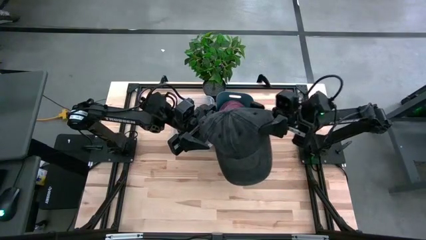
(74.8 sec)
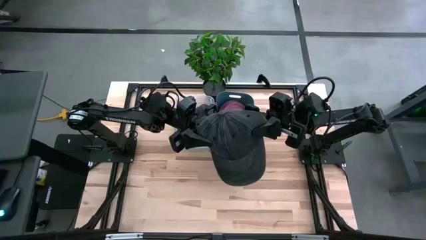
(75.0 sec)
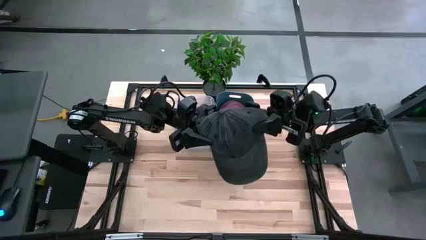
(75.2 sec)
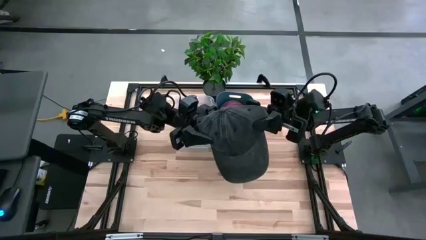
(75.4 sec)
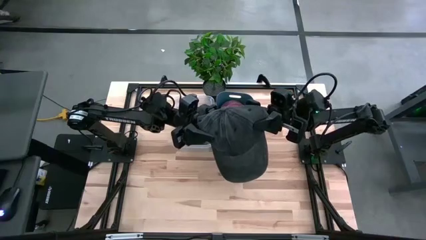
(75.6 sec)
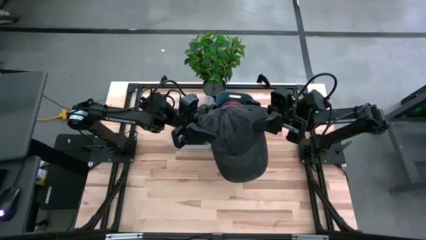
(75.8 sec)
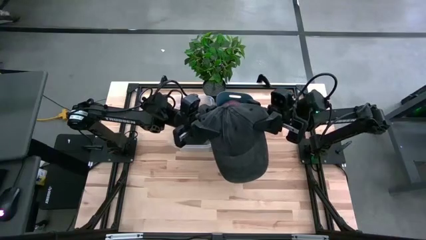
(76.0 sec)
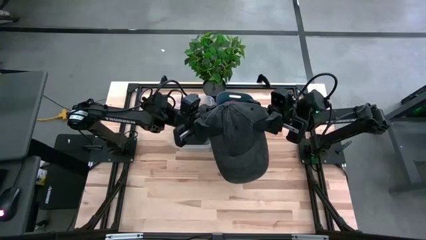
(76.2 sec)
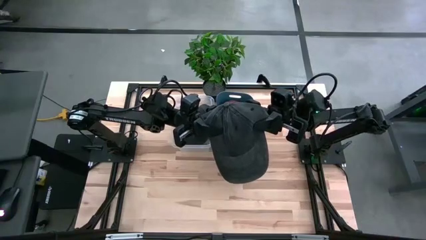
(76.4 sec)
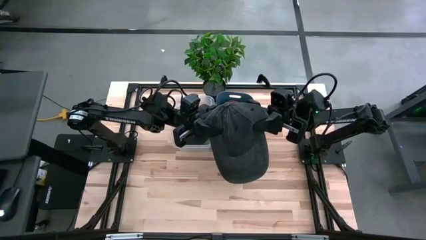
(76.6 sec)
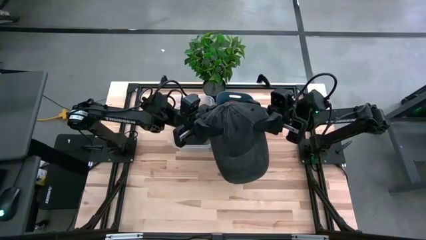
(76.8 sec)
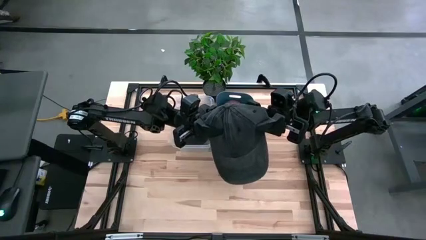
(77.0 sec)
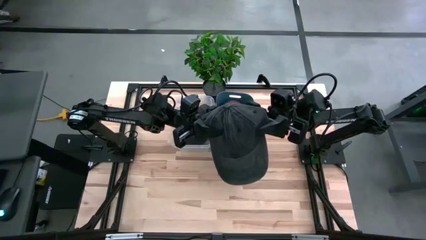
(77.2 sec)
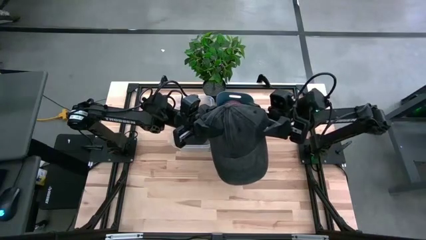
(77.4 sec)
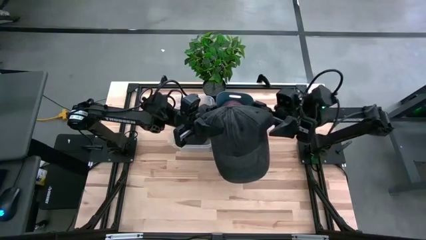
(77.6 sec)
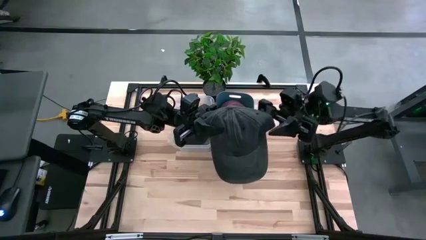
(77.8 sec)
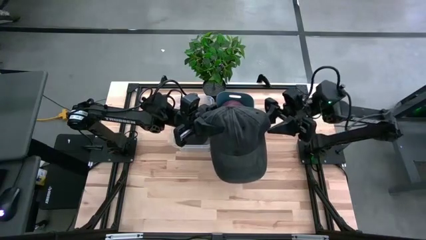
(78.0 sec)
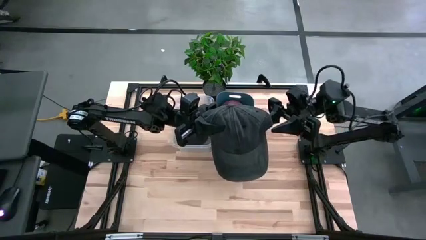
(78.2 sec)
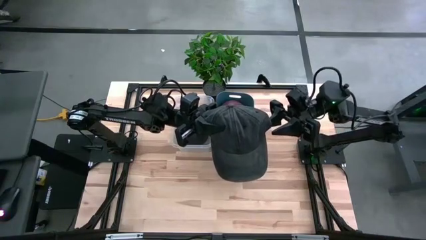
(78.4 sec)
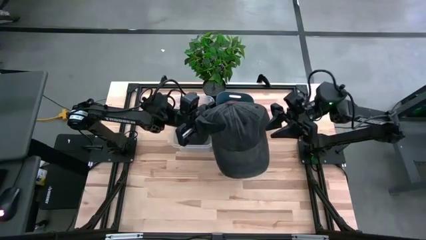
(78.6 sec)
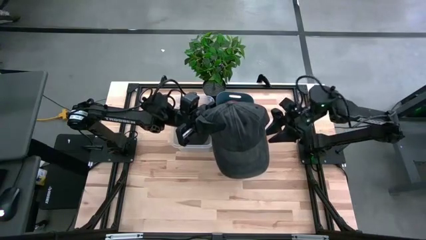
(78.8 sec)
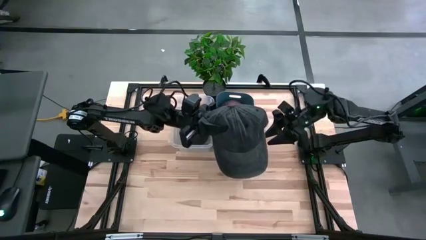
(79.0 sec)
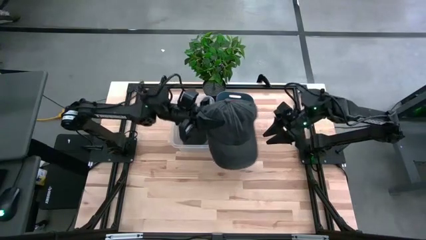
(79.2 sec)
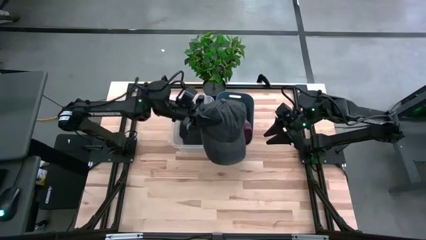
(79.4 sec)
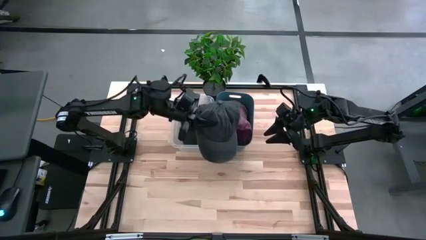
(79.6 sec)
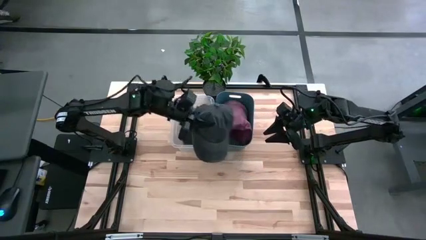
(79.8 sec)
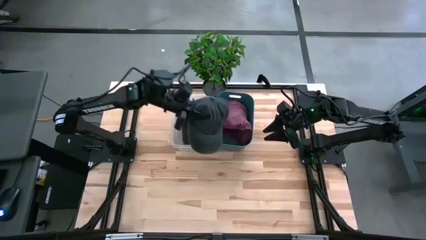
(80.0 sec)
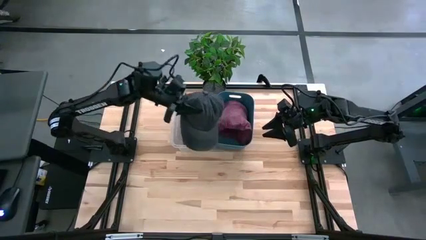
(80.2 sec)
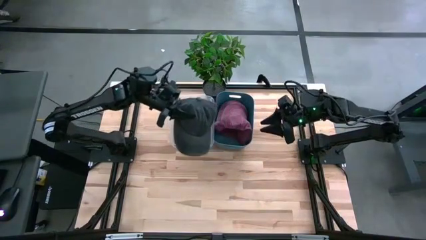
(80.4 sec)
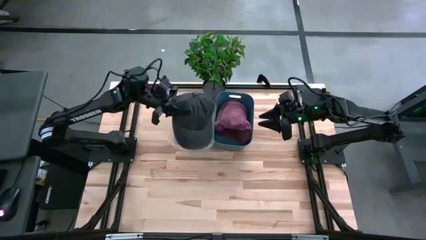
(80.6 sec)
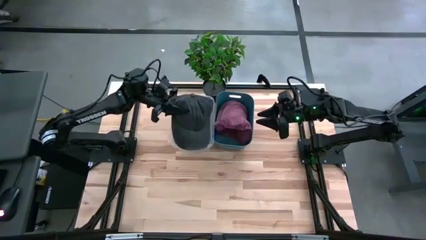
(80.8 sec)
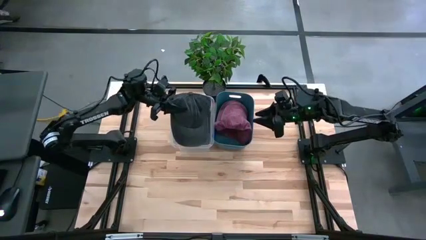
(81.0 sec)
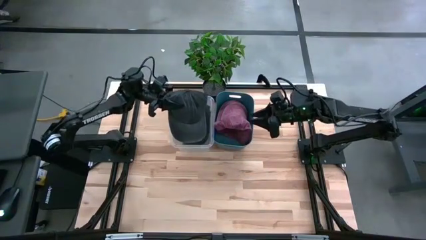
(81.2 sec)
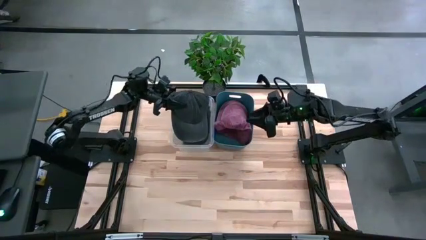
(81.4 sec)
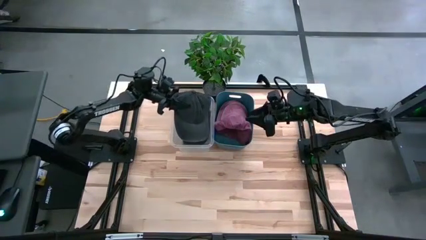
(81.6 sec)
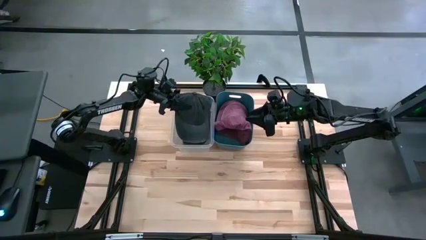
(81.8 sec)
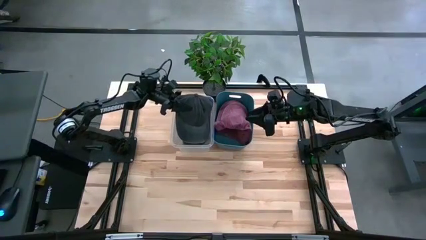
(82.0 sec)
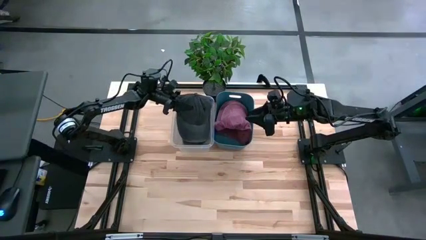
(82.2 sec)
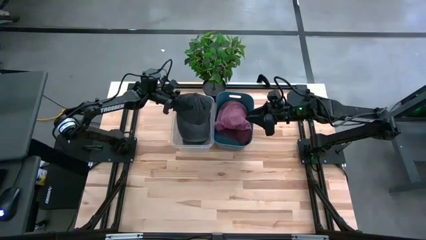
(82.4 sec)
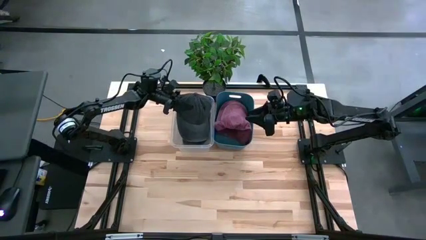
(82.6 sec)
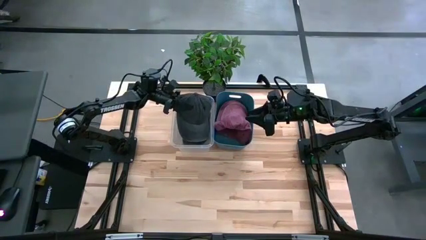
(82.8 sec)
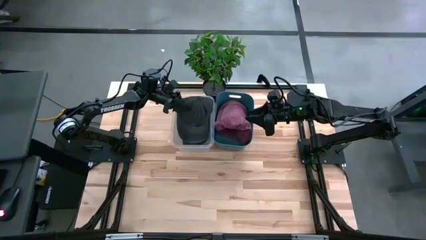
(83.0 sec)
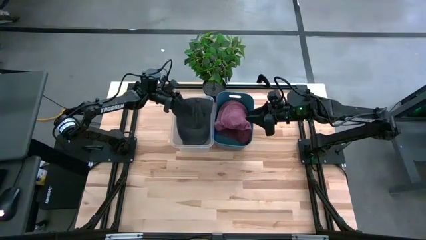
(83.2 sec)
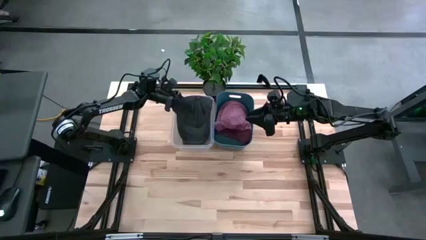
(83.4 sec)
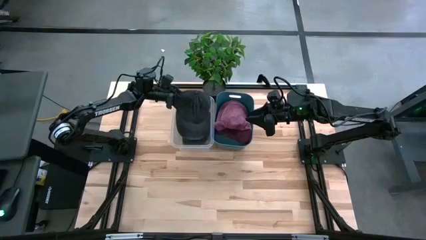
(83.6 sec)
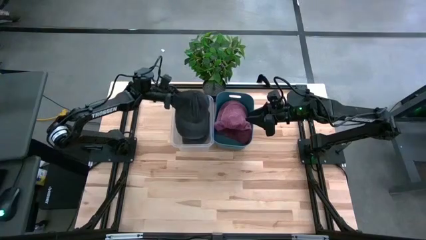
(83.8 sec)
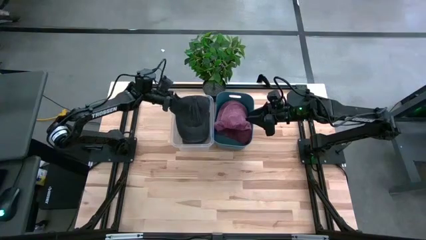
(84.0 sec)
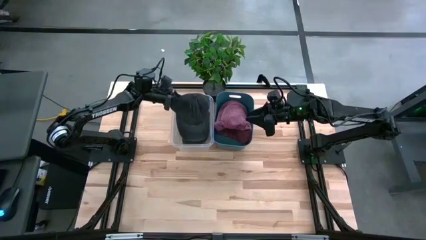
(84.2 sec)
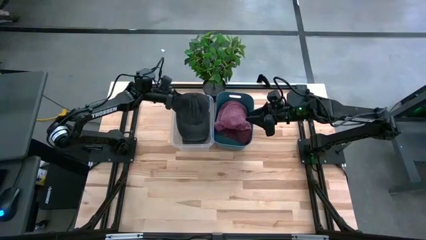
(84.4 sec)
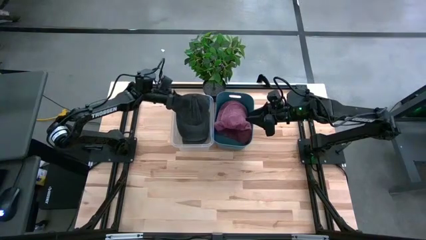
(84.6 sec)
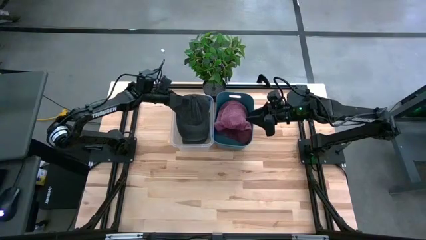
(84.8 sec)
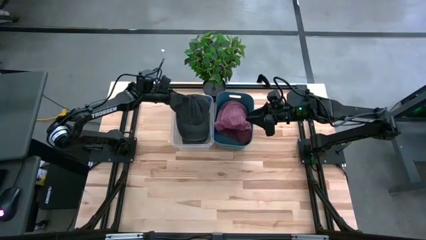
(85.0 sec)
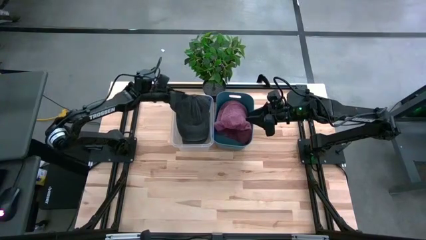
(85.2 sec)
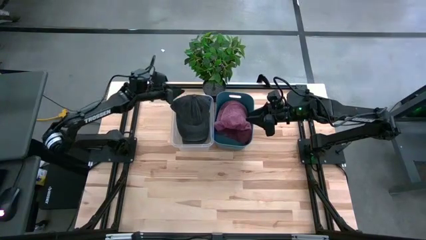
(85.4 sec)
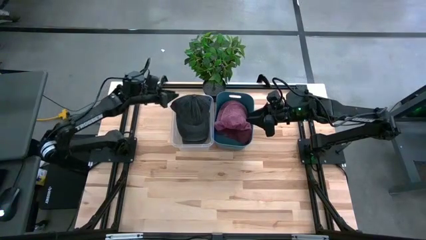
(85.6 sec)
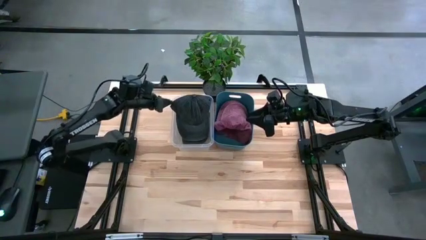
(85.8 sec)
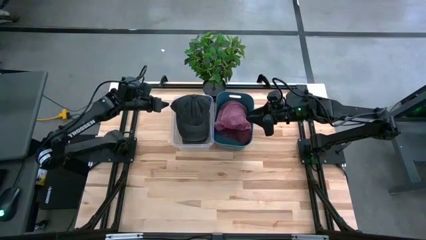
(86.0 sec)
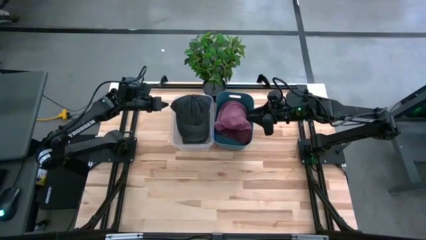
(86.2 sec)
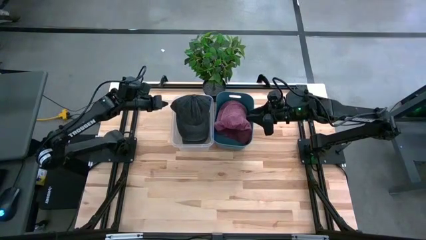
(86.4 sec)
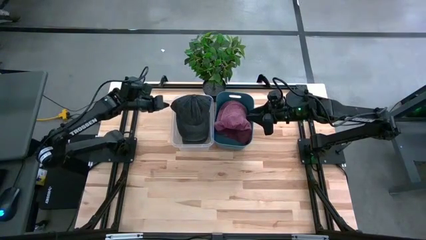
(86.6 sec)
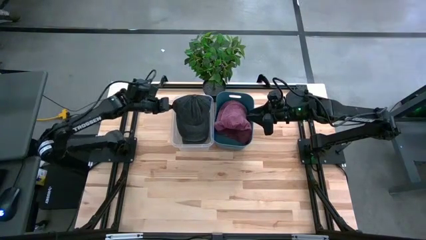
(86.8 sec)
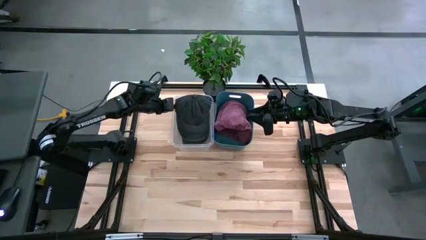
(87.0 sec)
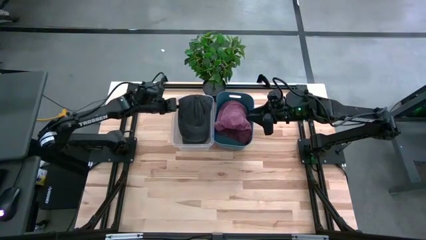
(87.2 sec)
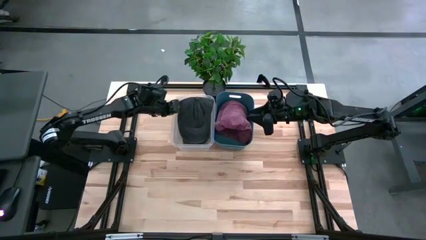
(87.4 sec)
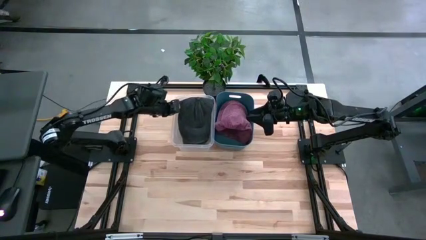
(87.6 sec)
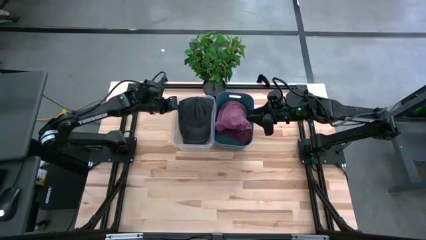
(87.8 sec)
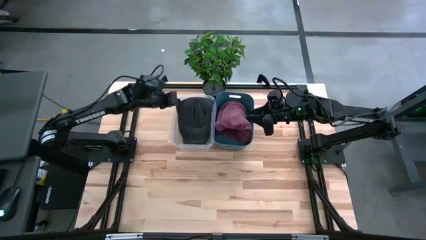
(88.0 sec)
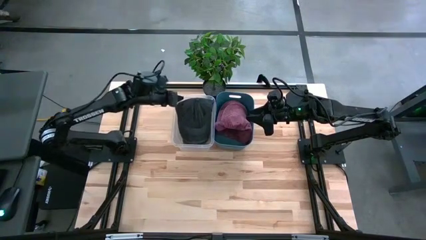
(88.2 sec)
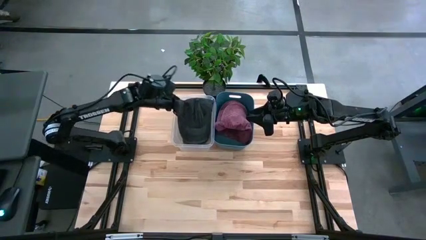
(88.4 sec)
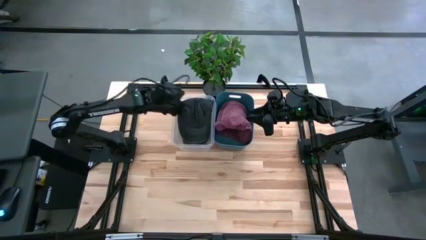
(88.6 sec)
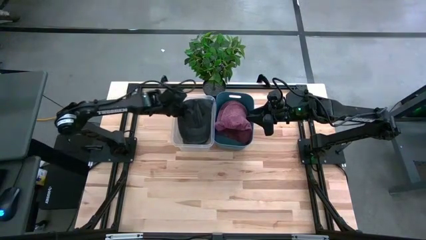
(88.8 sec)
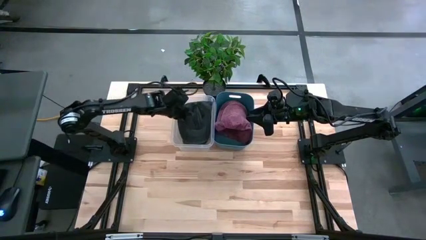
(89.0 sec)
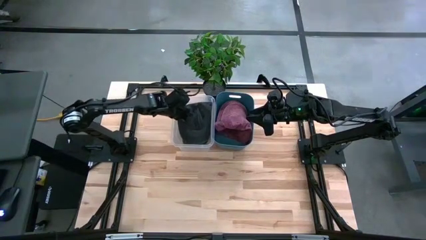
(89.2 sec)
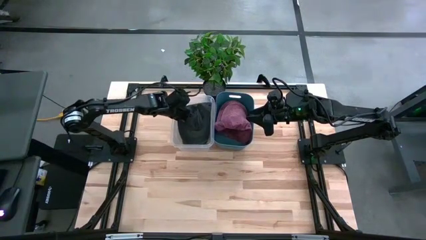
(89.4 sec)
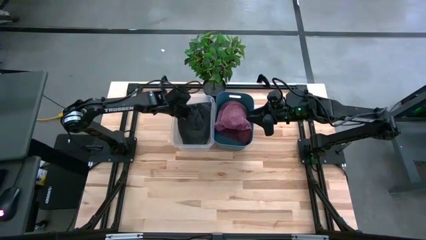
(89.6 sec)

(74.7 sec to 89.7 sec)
Task: Pick & Place hat
Put the black cap into the blue bin
